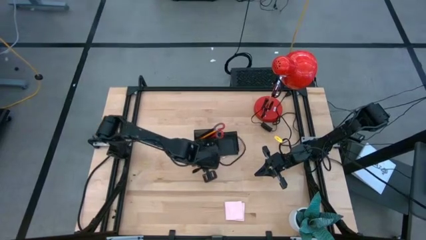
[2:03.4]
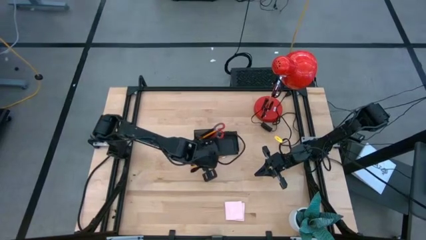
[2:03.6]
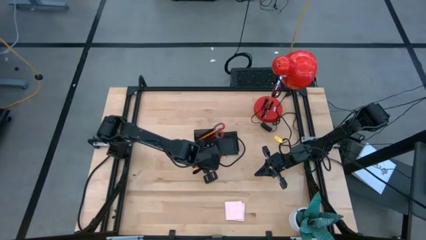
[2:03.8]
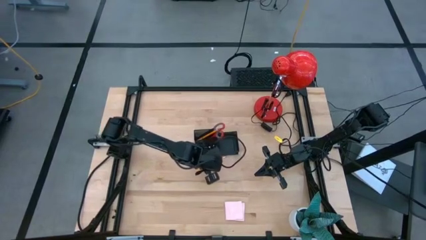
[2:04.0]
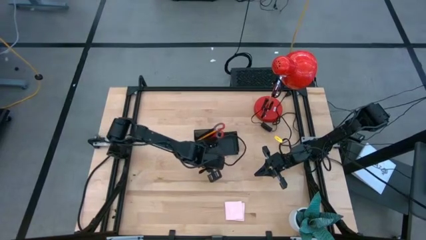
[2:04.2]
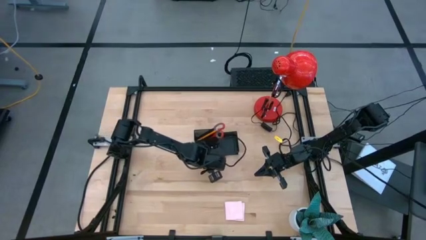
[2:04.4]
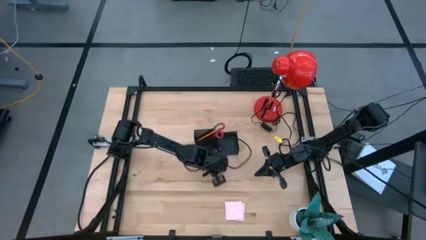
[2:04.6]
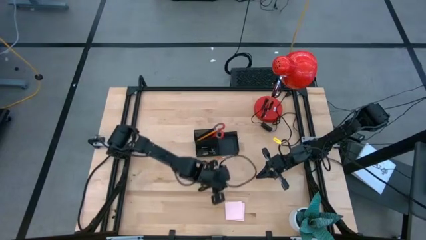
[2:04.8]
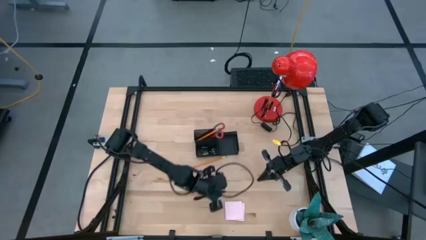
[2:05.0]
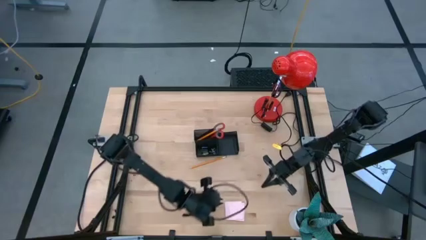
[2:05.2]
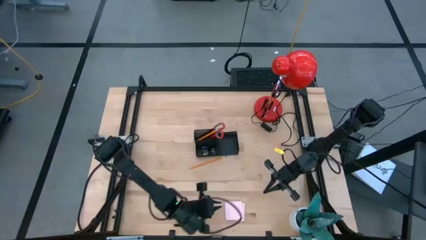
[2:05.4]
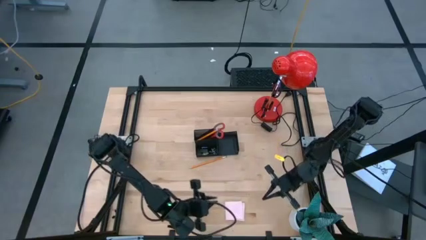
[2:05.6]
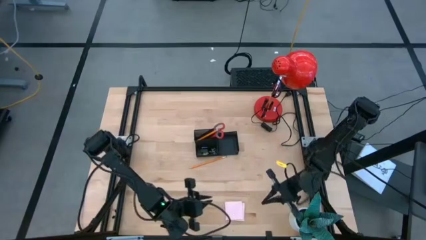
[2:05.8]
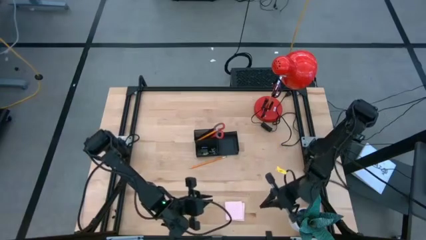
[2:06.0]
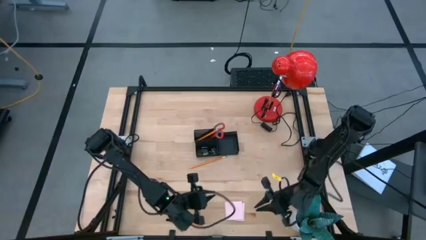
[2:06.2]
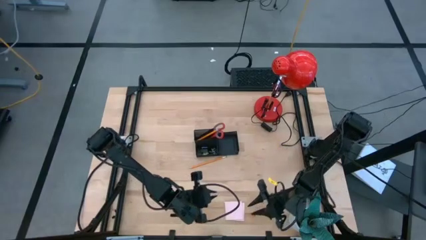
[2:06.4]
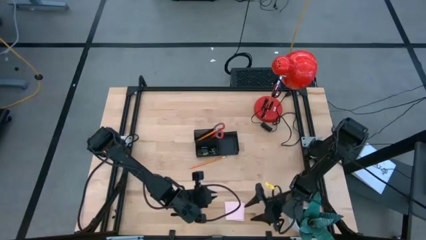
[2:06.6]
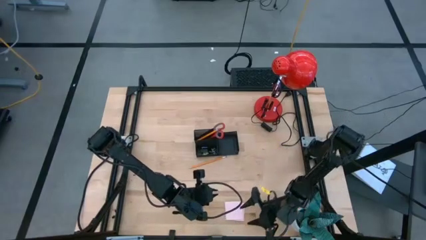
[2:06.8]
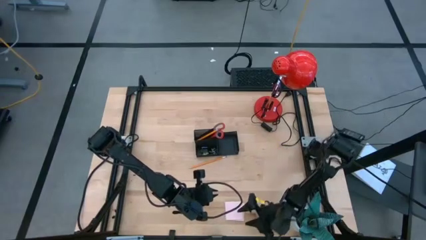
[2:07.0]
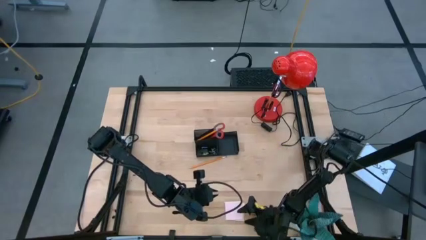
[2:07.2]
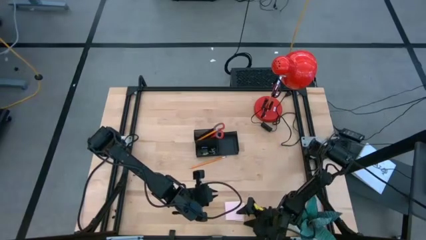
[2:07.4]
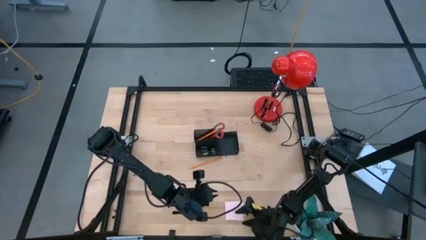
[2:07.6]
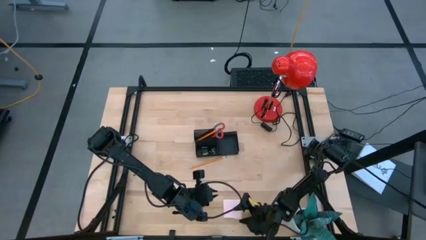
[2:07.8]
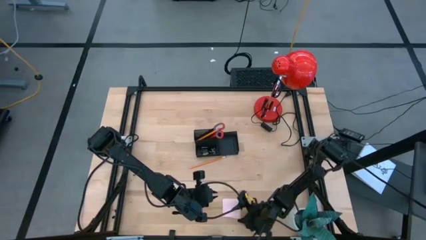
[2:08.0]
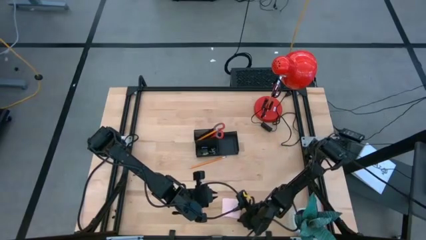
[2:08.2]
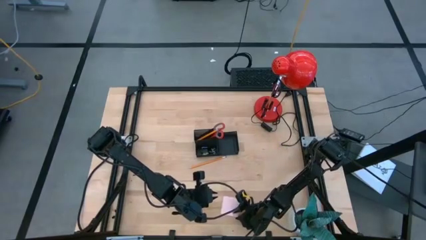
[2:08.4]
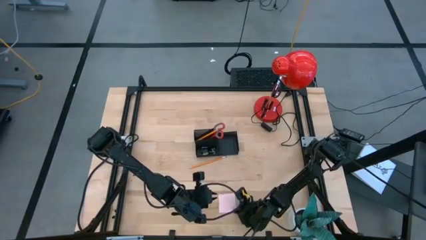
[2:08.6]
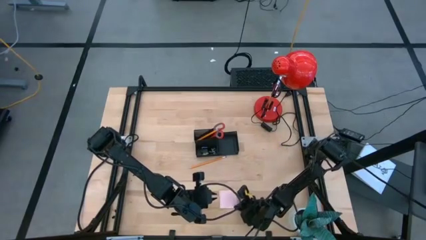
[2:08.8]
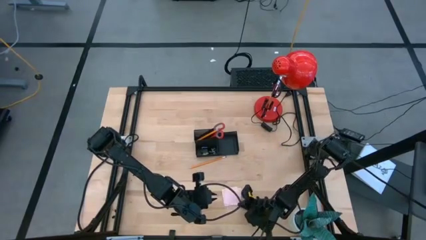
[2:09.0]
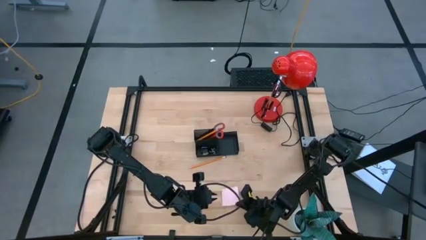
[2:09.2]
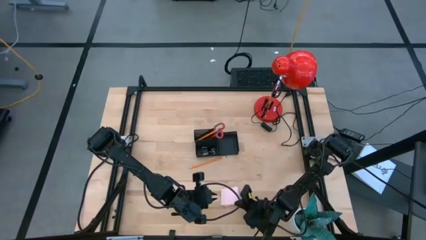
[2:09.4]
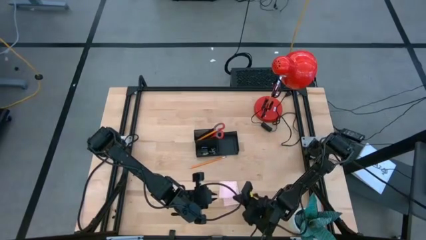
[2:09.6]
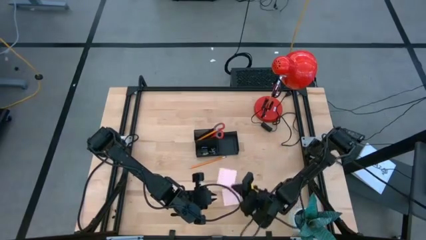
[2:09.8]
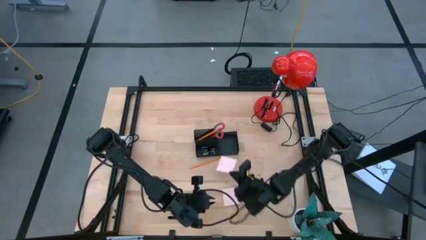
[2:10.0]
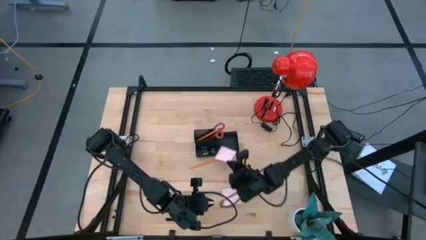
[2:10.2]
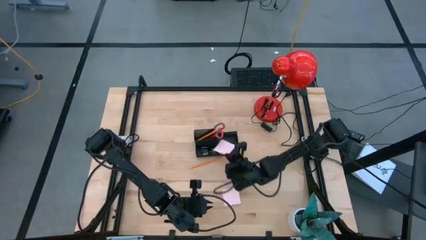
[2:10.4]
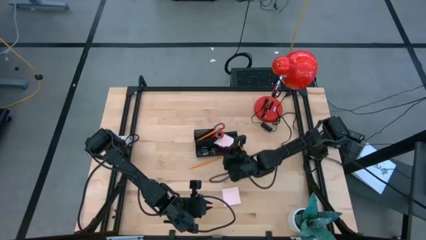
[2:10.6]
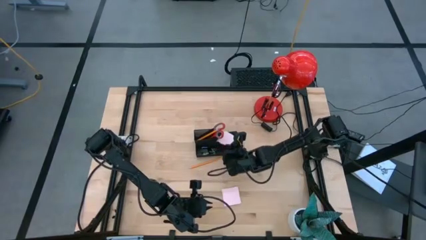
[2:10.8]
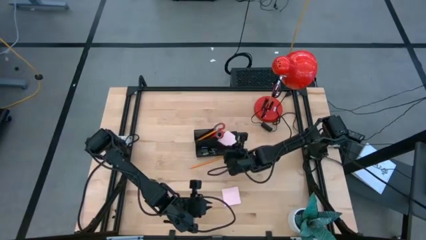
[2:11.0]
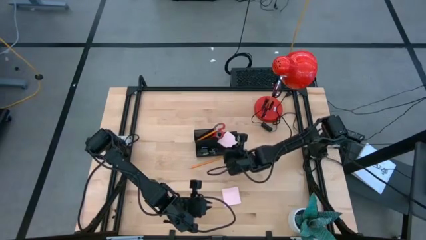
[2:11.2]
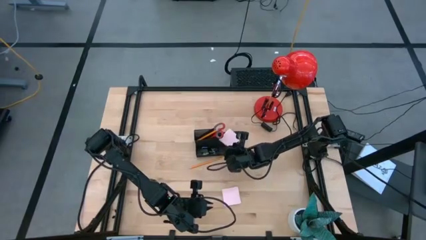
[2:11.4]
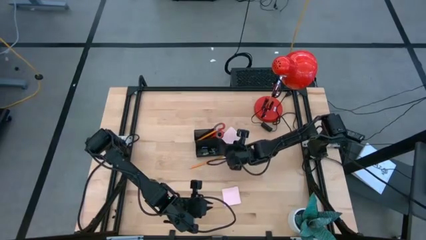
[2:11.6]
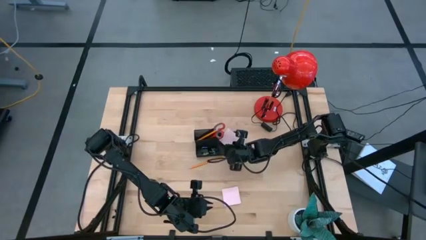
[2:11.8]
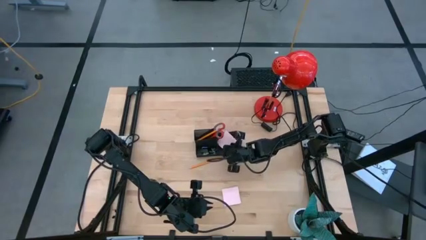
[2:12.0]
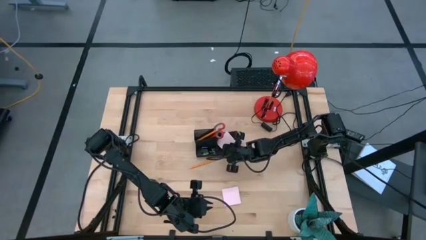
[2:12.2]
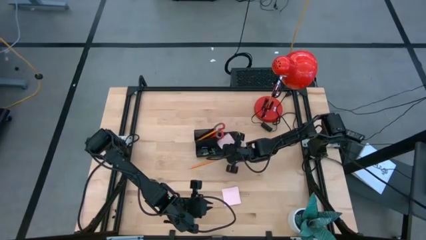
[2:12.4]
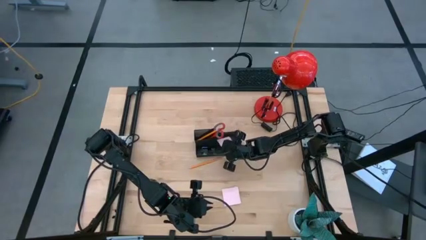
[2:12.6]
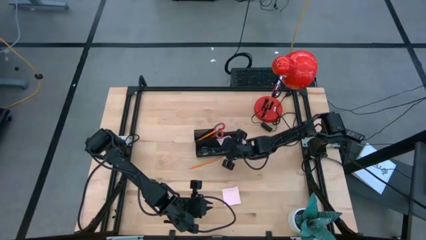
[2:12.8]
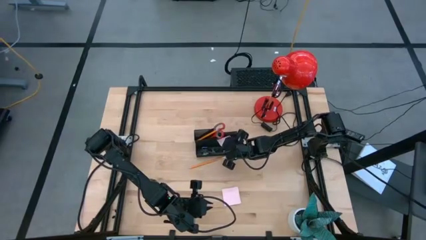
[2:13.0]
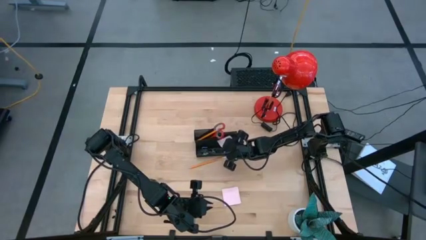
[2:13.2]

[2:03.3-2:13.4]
Task: Pick and place office supplies into organizer
Put the notepad sheet into the desk organizer

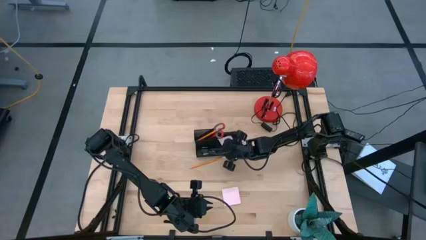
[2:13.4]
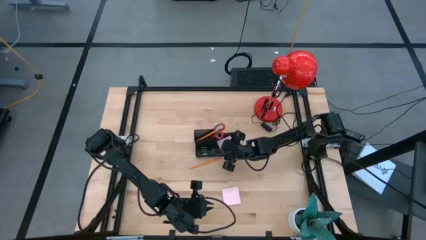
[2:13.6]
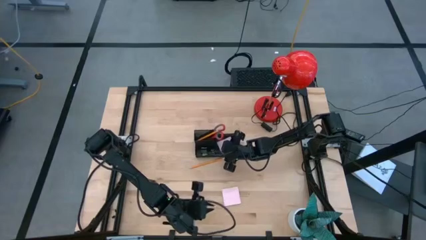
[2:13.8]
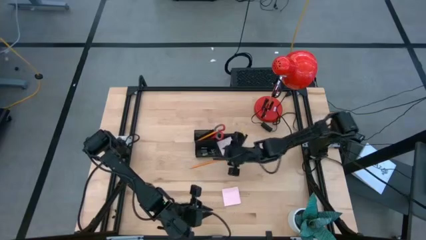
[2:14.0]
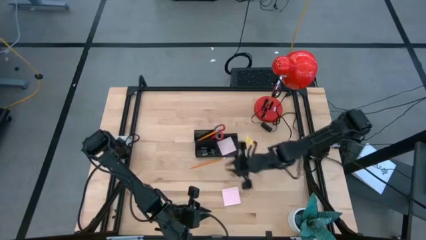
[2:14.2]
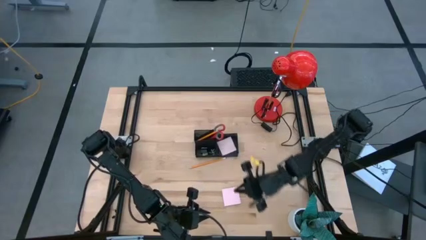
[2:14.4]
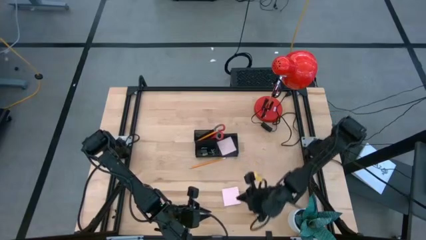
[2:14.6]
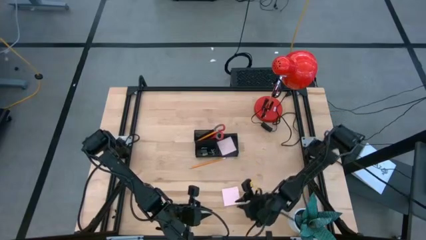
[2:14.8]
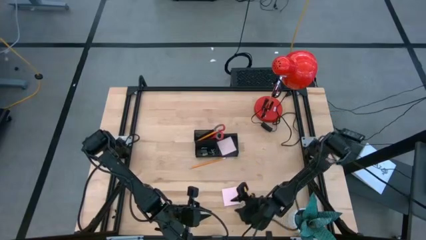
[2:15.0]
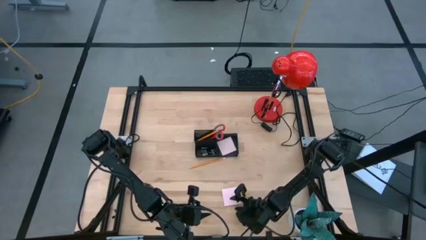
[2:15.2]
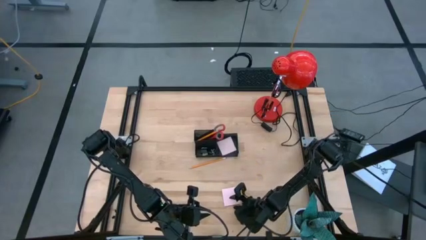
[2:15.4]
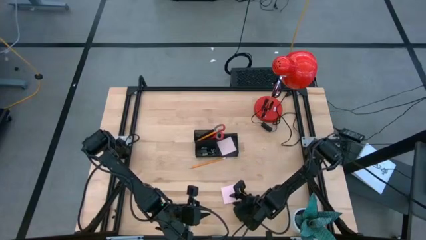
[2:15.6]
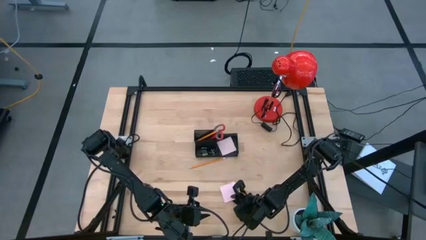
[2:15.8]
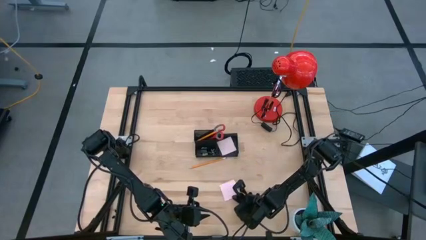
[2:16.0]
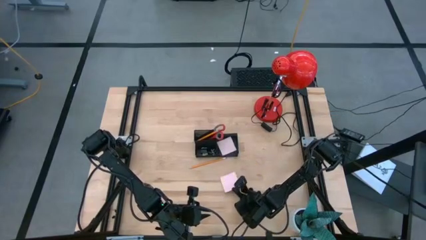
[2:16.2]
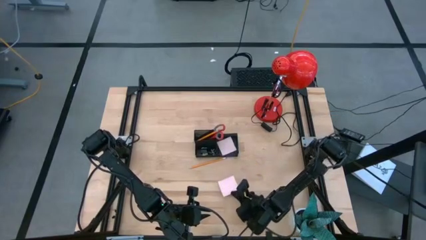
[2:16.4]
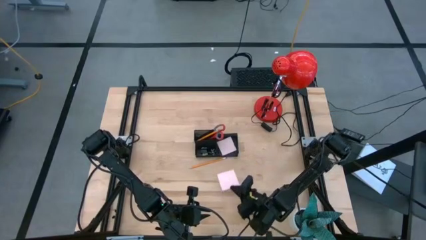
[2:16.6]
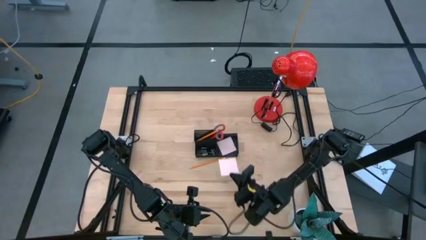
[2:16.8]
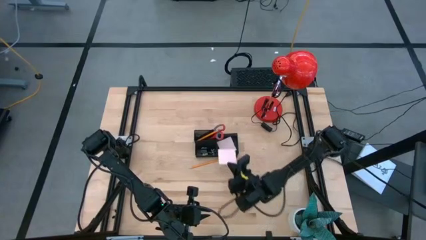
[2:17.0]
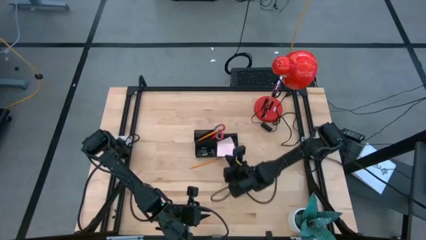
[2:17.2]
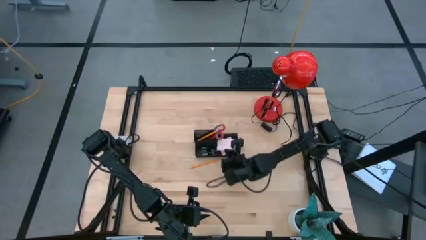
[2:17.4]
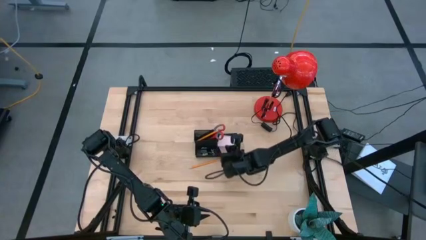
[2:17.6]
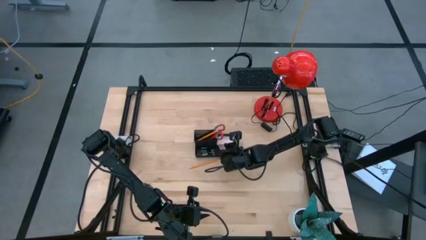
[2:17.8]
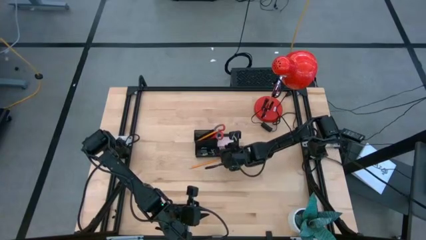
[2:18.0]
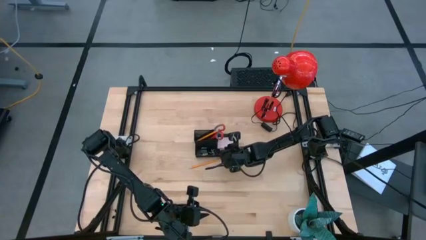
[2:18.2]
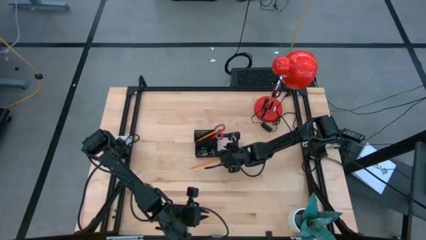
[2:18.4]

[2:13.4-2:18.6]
Put the notepad into the desk organizer
